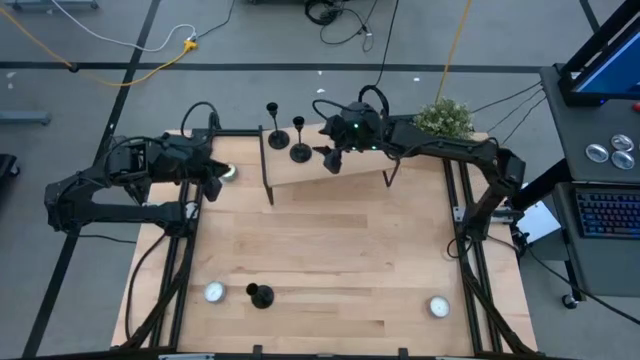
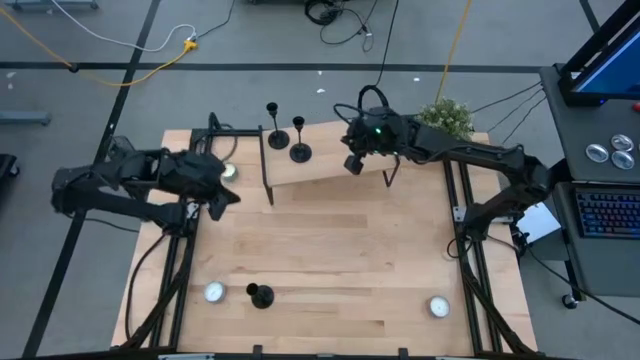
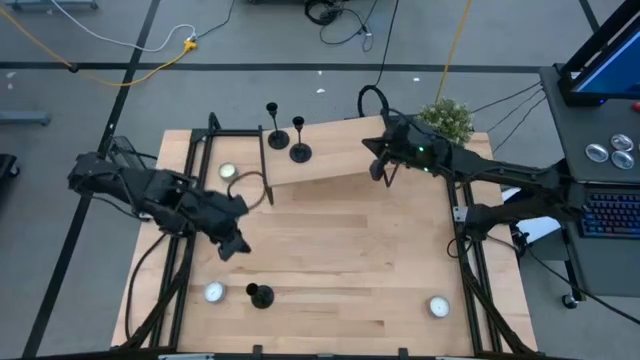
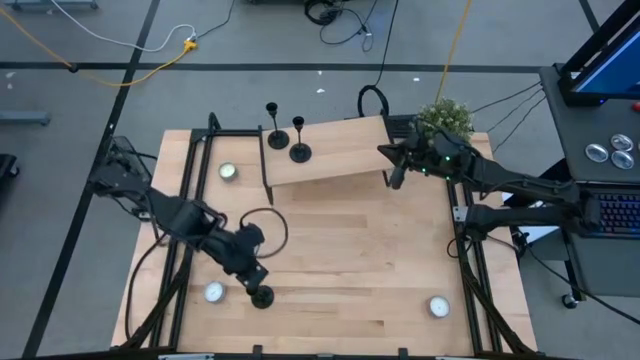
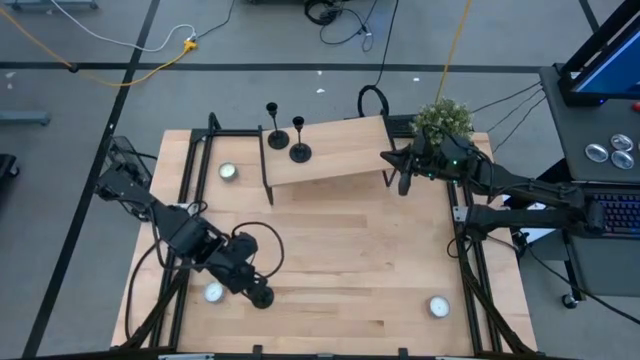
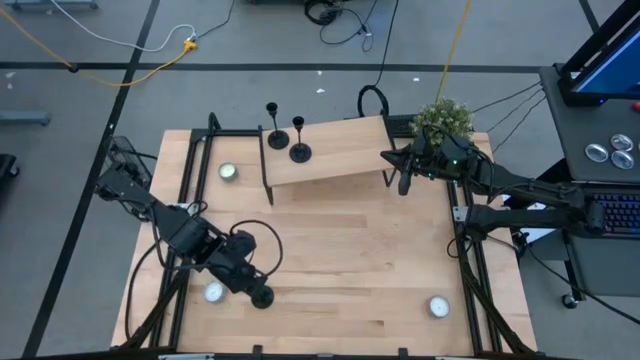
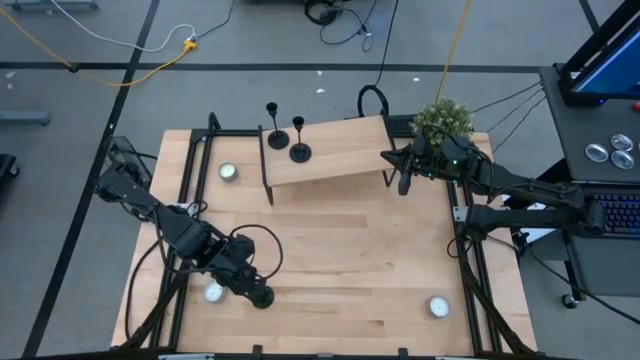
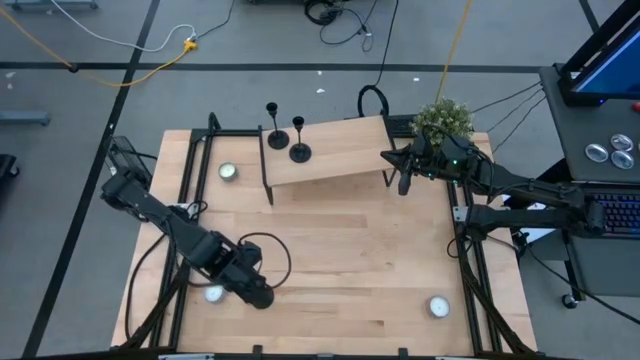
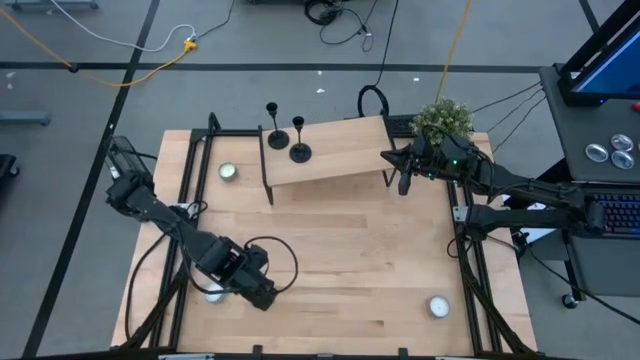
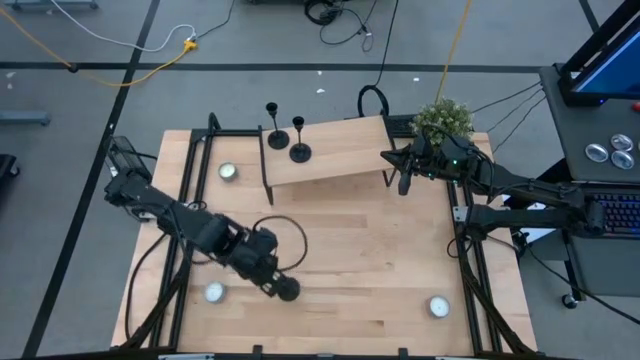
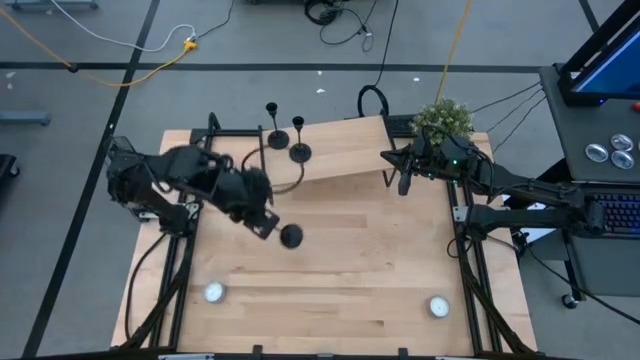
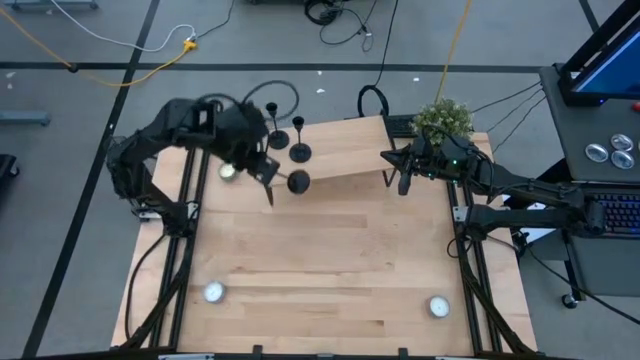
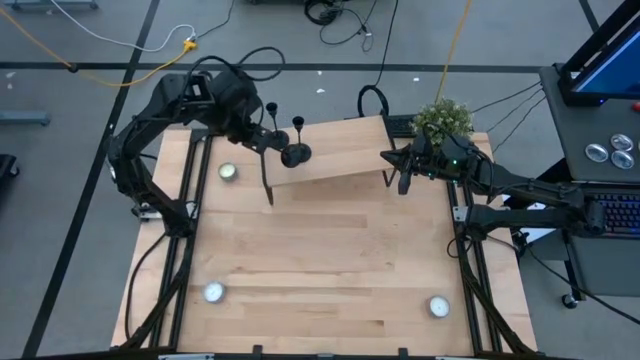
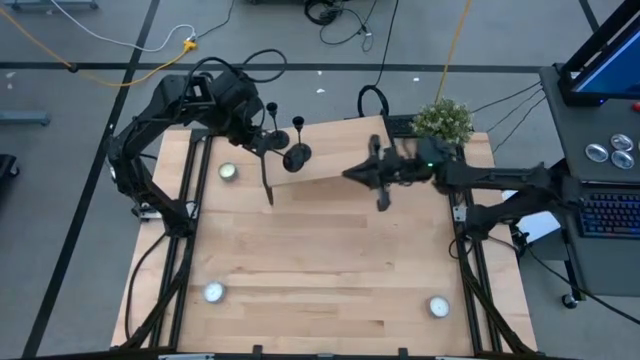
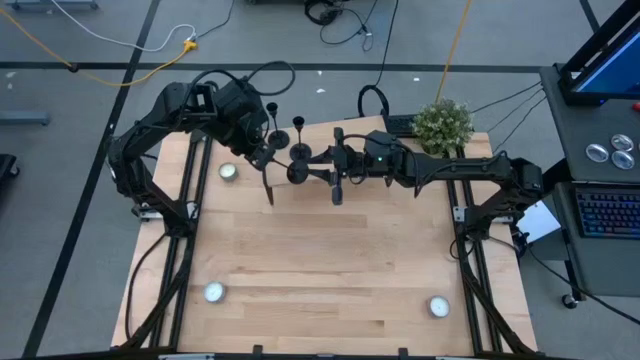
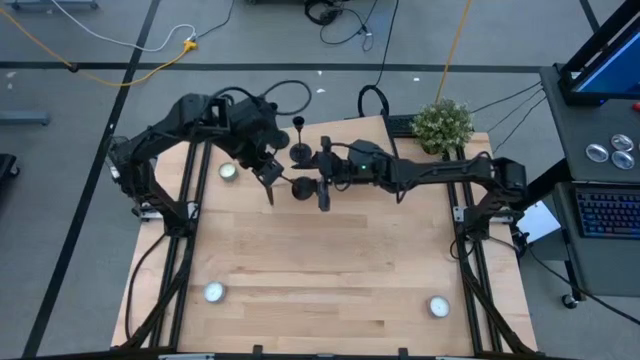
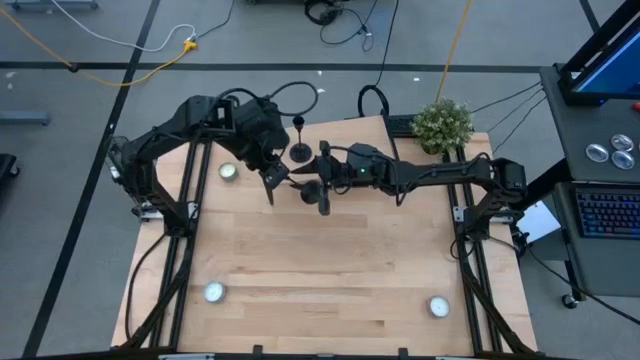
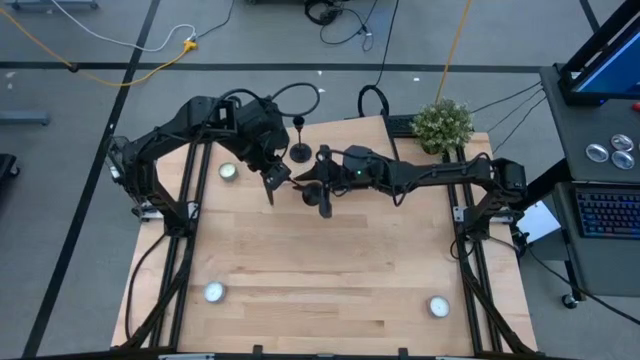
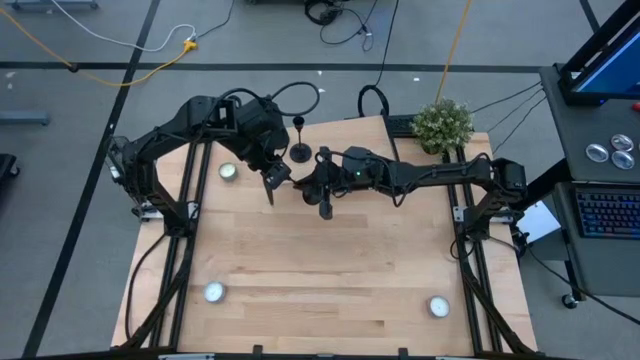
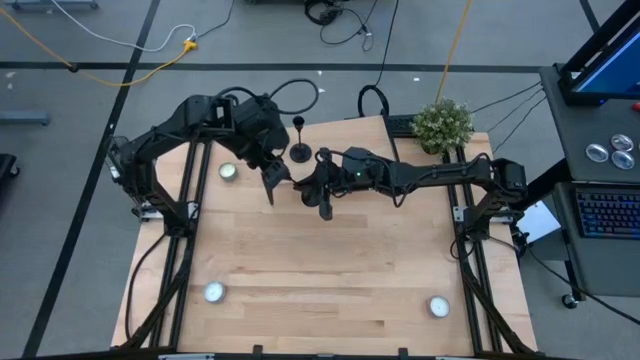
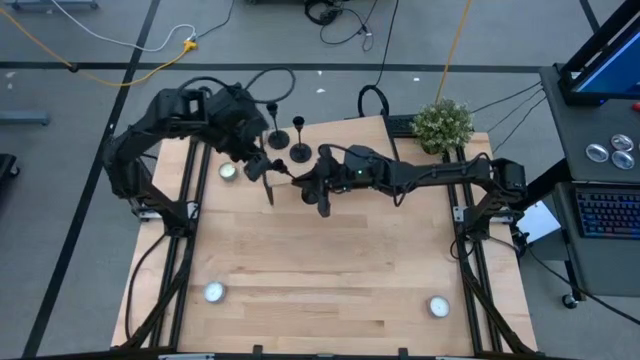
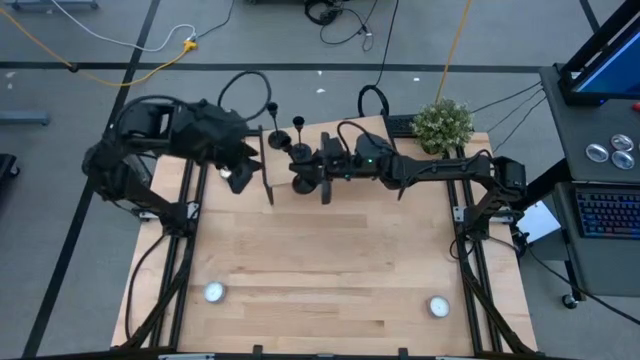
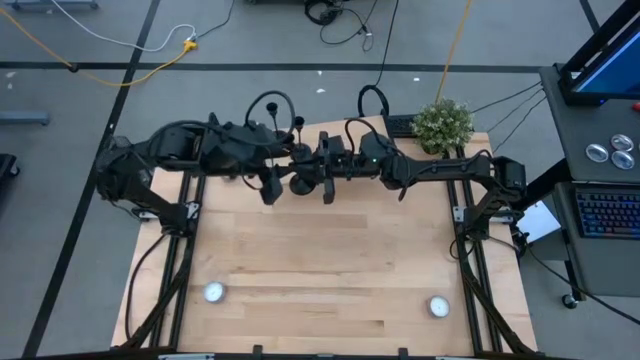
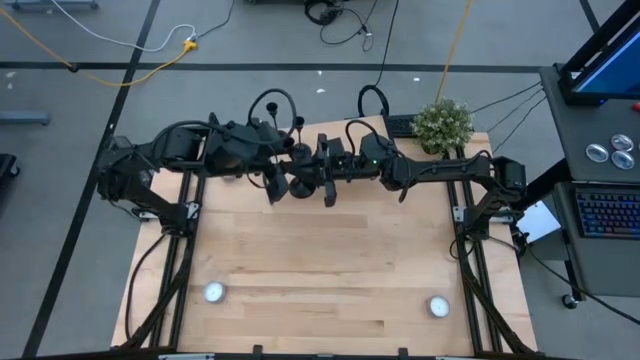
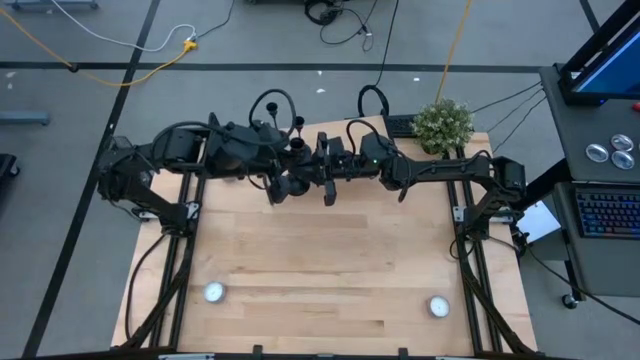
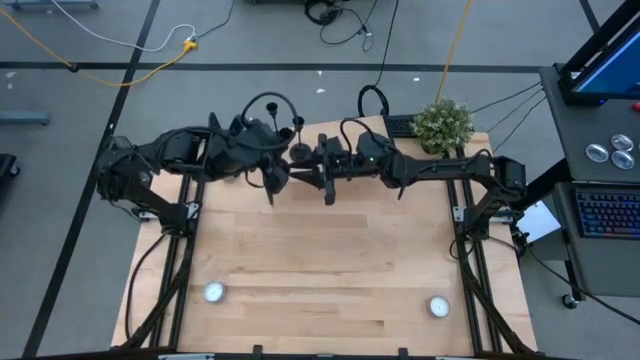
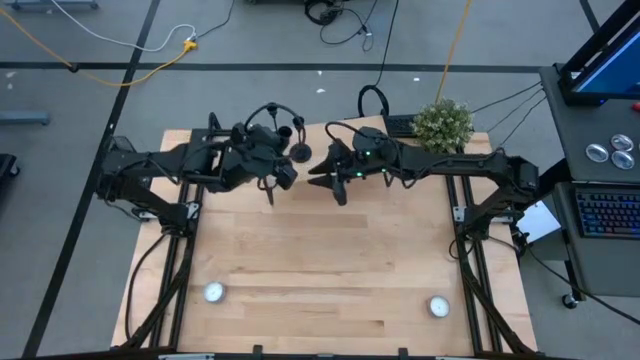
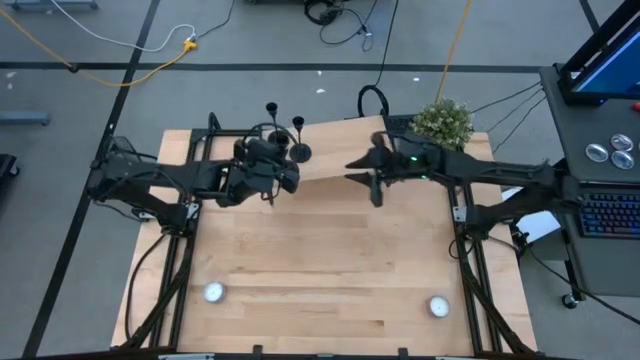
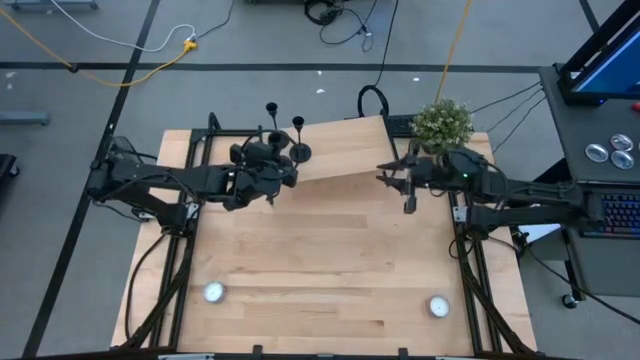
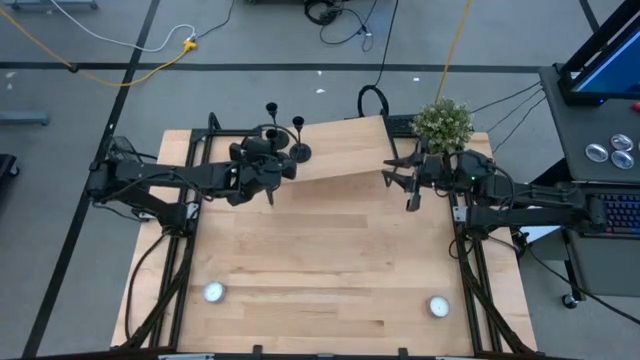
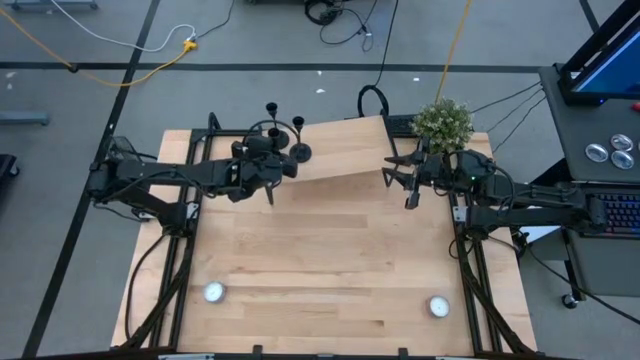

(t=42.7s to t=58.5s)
Task: Pick & Place candle stick holders
Put the candle holder on the shelf

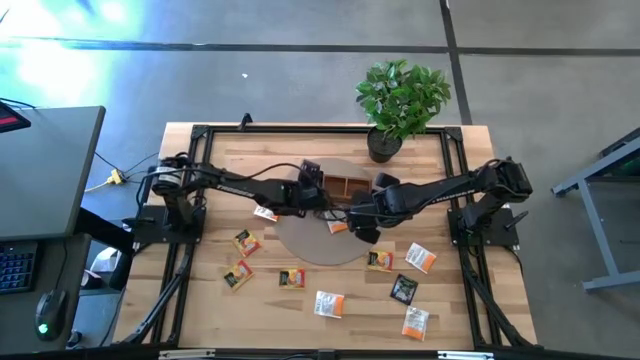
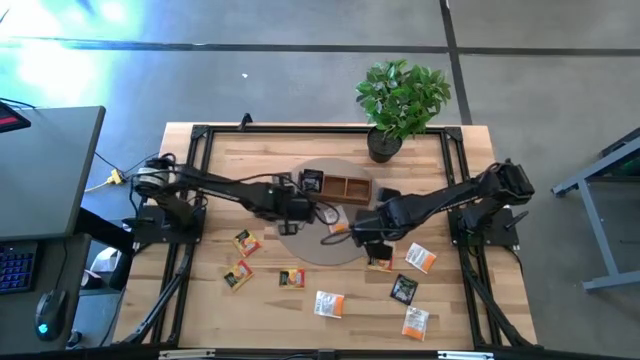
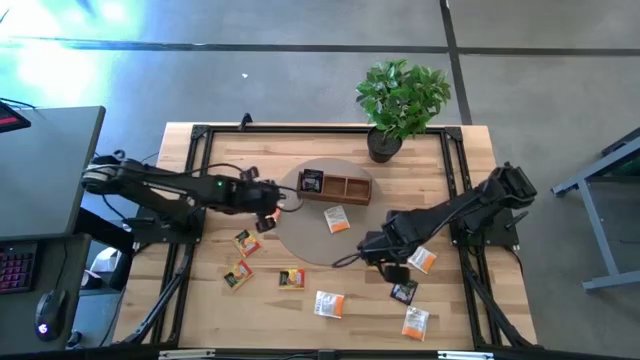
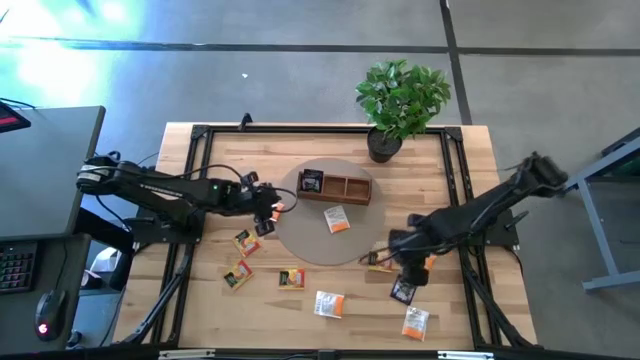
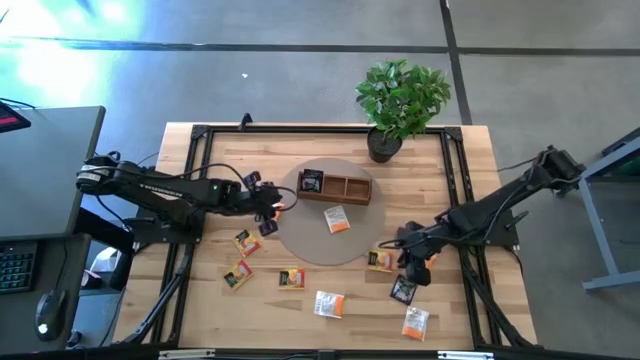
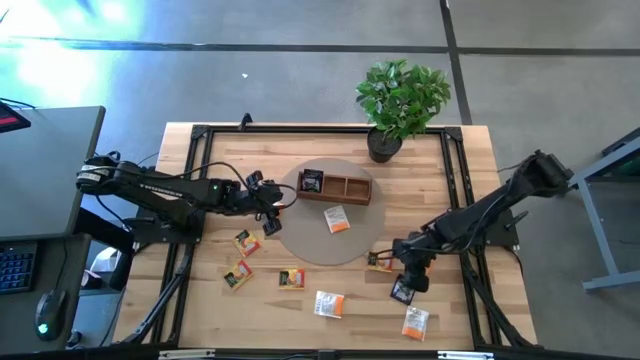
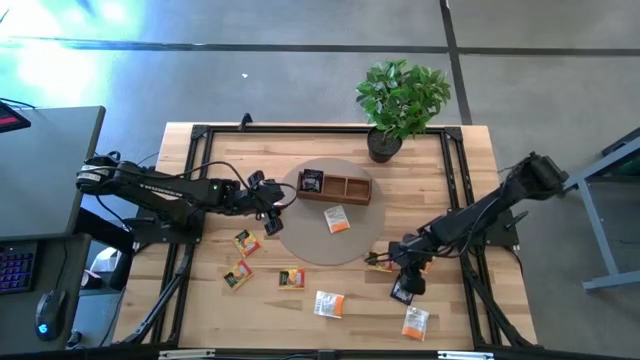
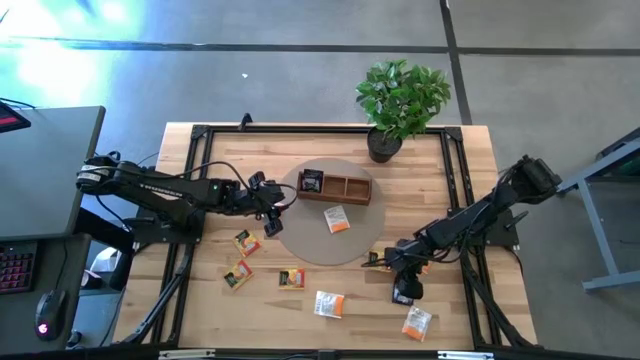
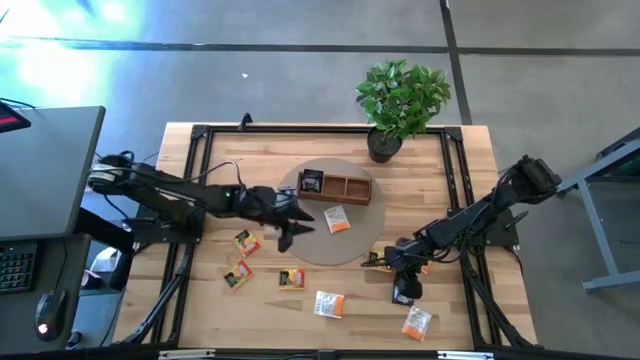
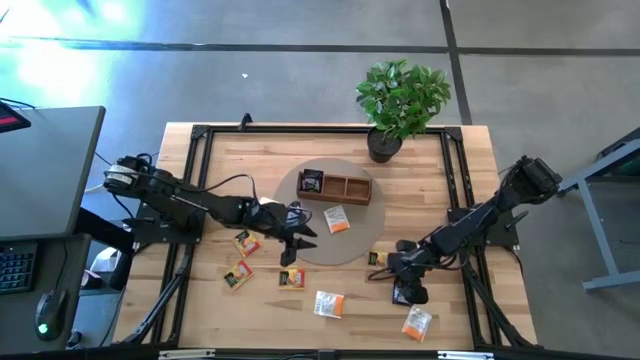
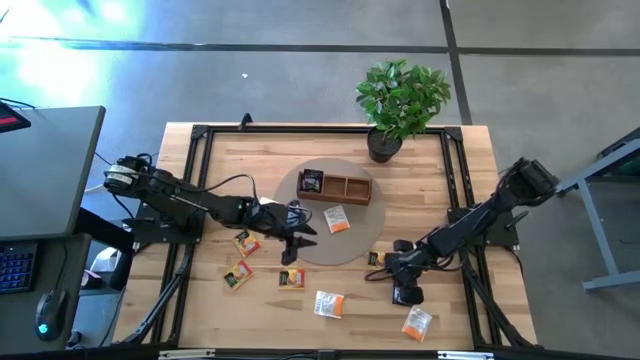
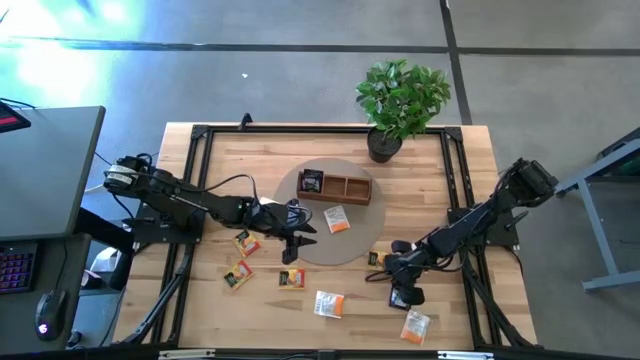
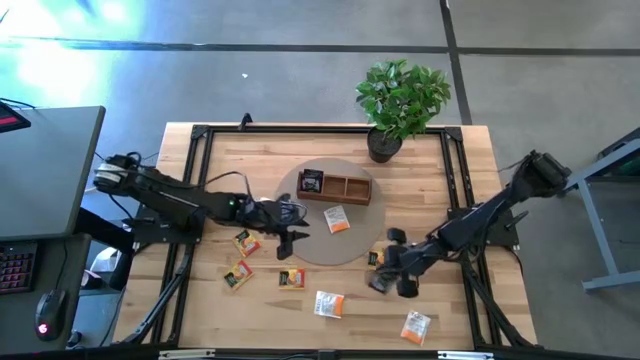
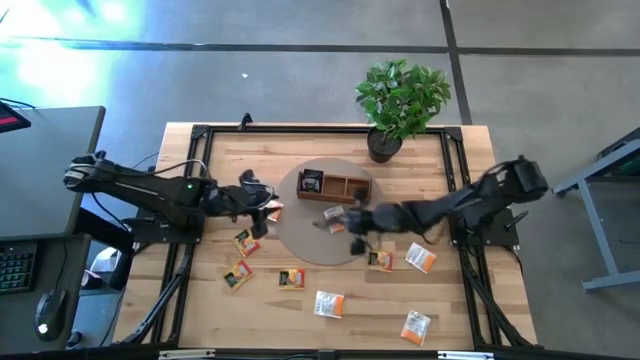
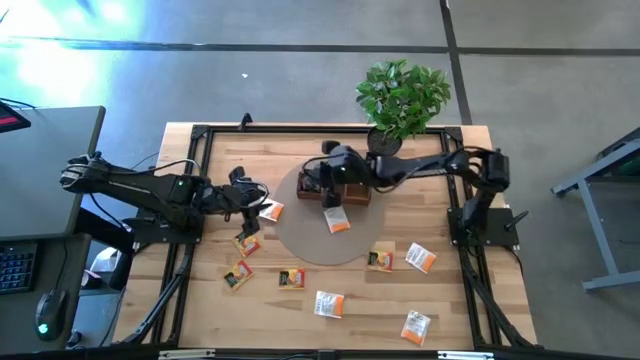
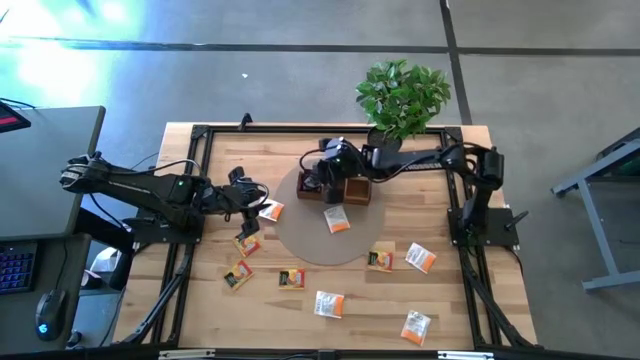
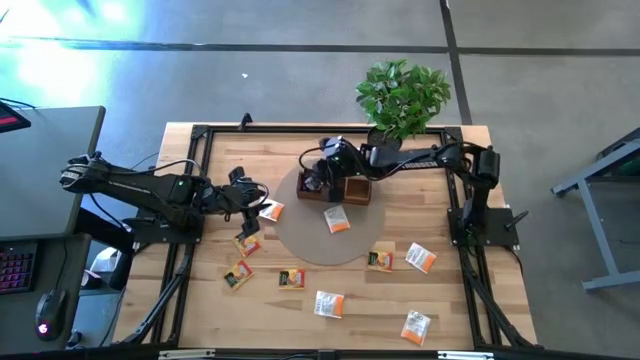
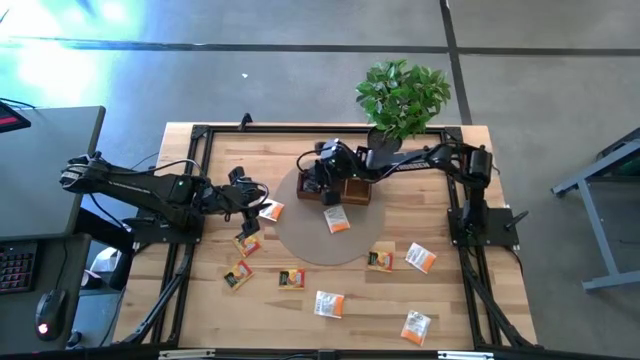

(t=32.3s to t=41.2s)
Task: Pick & Place Tea
Put the black tea bag into the left side area of the wooden organizer
